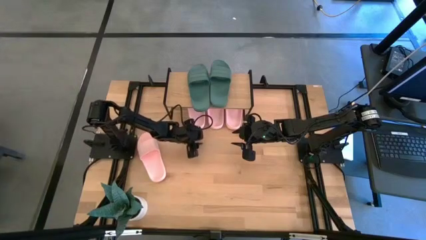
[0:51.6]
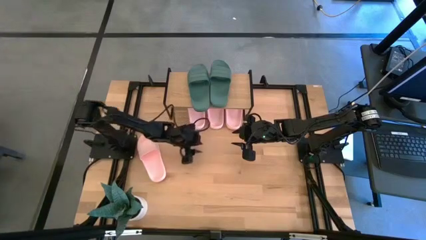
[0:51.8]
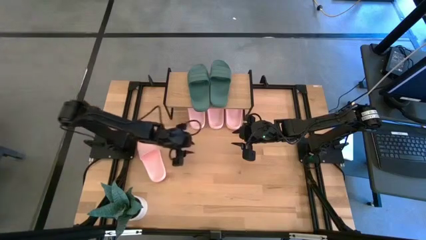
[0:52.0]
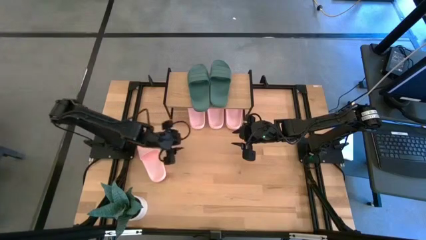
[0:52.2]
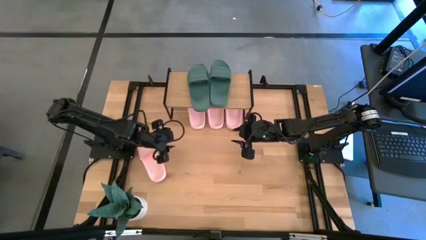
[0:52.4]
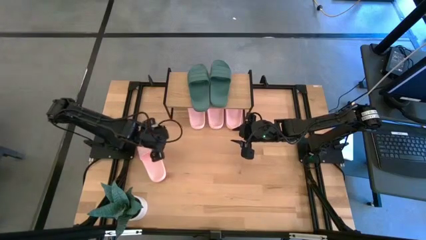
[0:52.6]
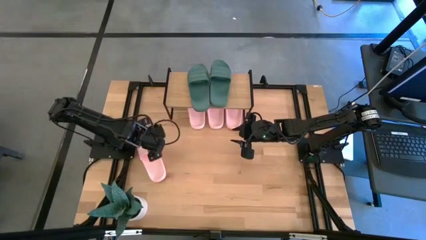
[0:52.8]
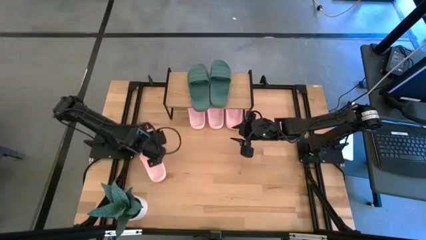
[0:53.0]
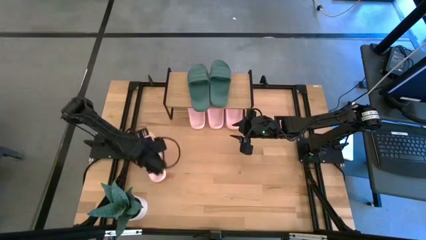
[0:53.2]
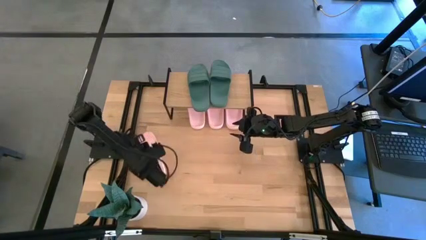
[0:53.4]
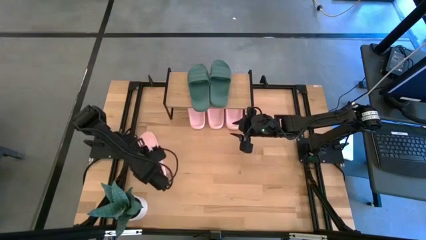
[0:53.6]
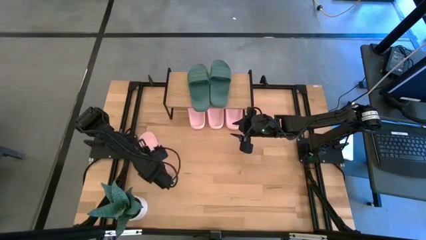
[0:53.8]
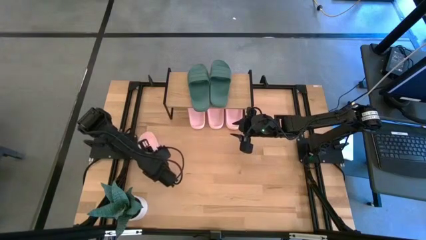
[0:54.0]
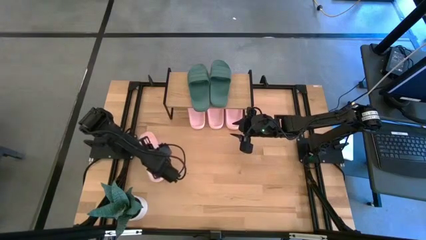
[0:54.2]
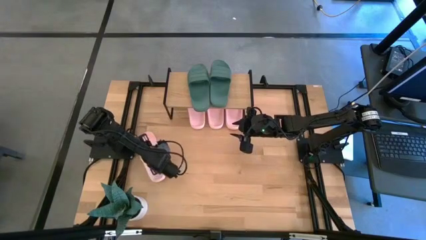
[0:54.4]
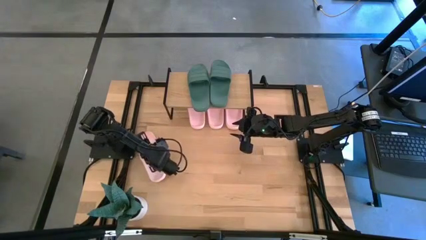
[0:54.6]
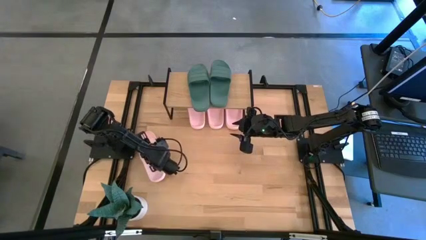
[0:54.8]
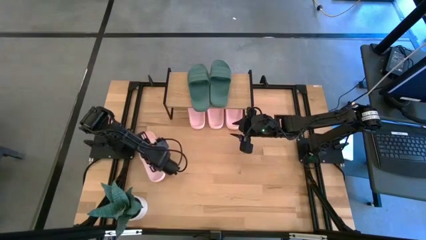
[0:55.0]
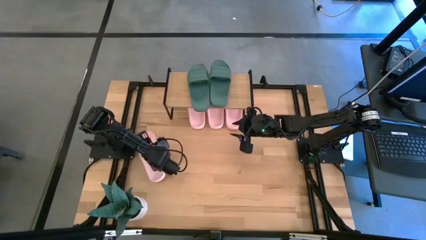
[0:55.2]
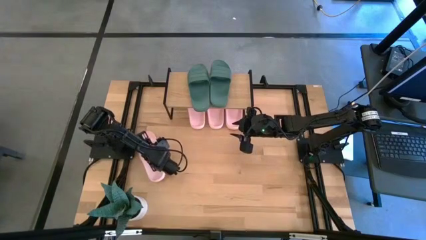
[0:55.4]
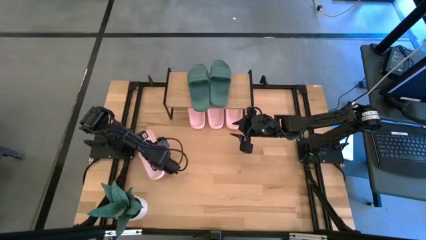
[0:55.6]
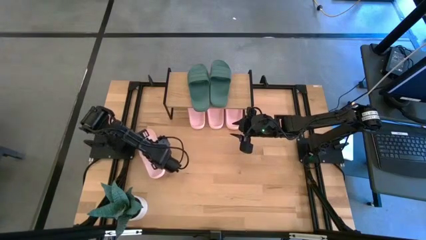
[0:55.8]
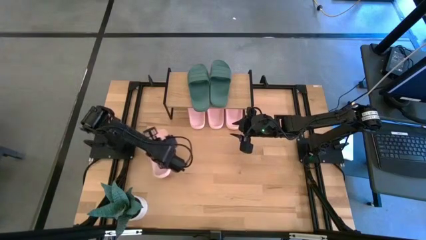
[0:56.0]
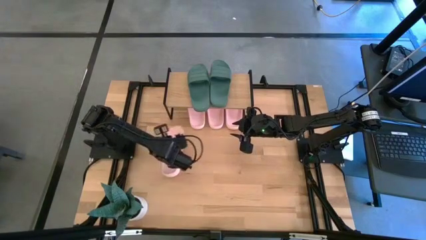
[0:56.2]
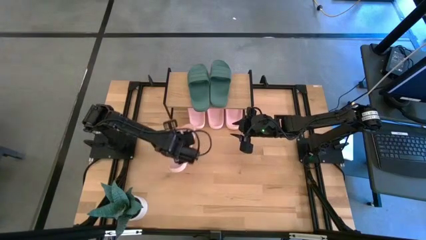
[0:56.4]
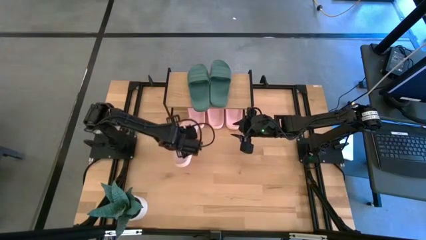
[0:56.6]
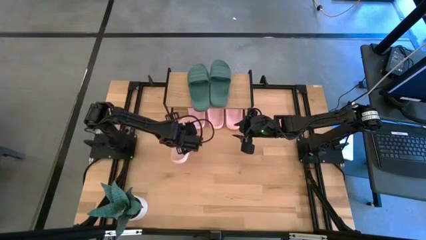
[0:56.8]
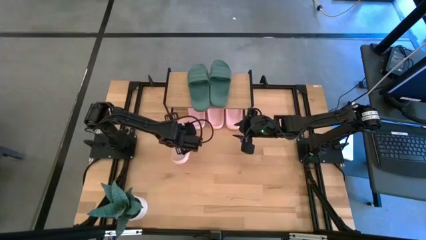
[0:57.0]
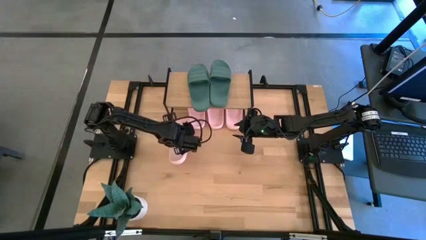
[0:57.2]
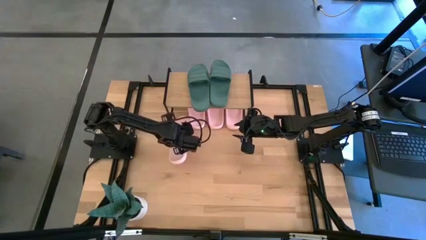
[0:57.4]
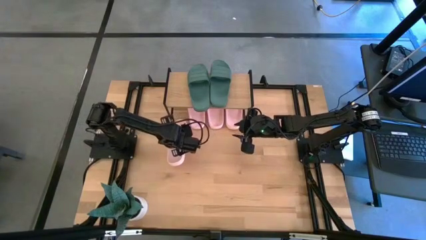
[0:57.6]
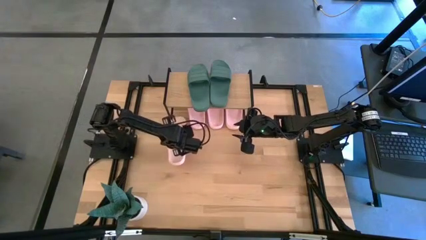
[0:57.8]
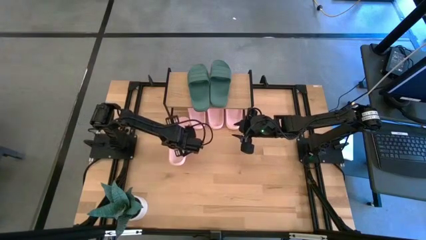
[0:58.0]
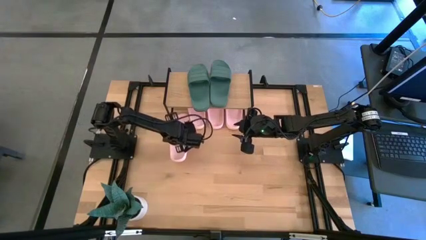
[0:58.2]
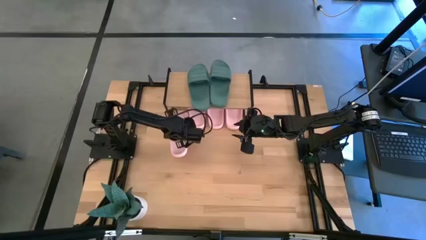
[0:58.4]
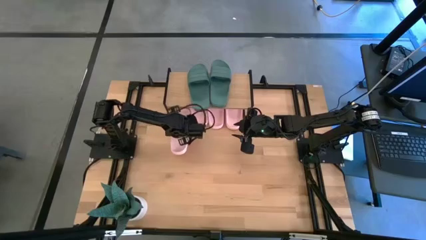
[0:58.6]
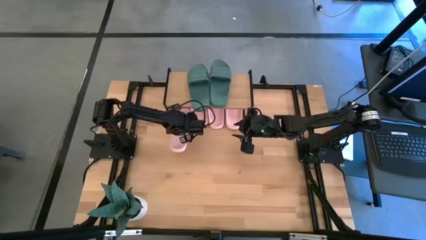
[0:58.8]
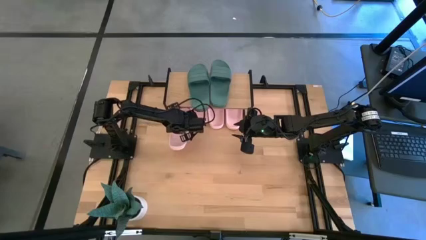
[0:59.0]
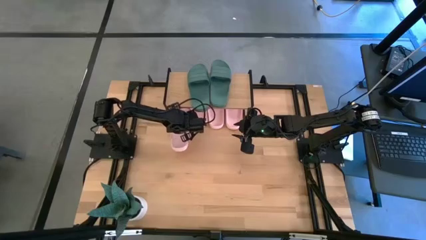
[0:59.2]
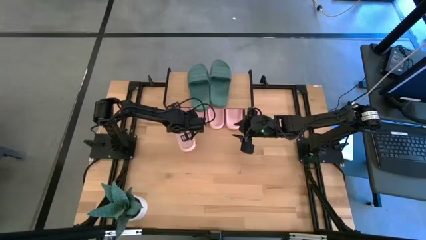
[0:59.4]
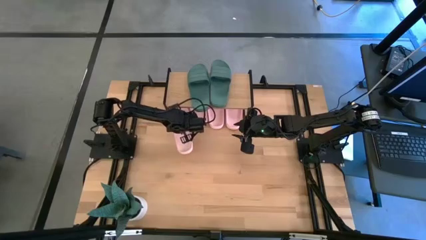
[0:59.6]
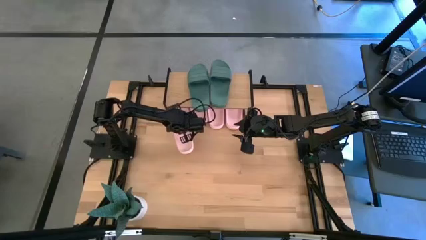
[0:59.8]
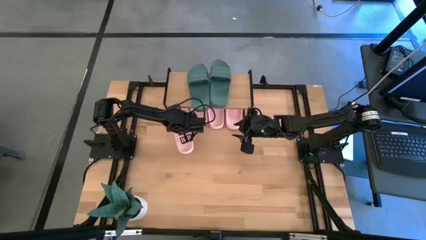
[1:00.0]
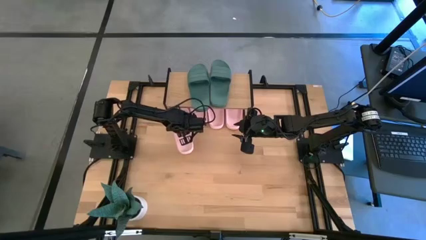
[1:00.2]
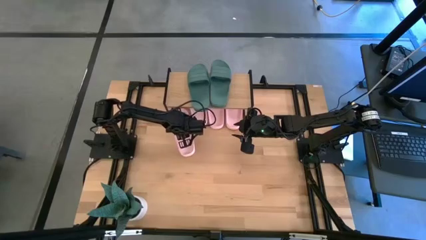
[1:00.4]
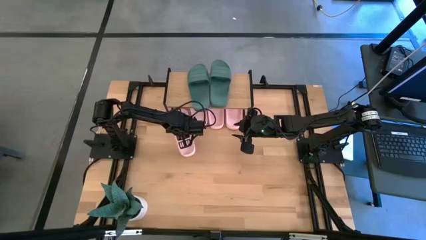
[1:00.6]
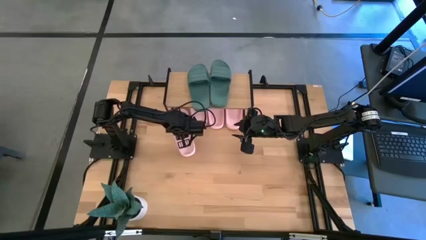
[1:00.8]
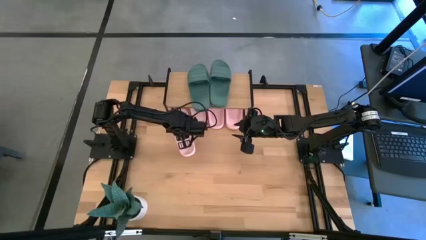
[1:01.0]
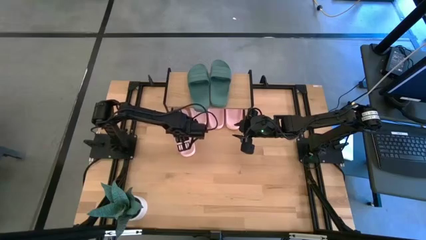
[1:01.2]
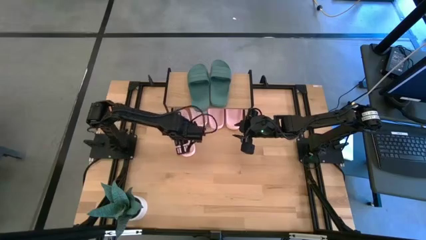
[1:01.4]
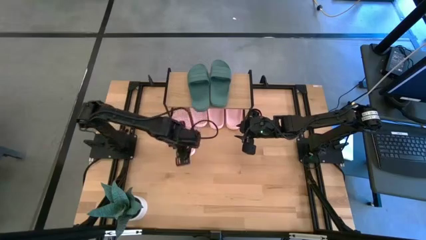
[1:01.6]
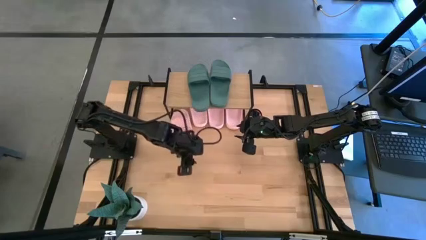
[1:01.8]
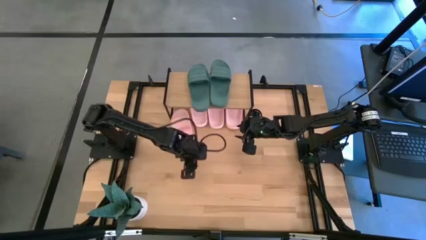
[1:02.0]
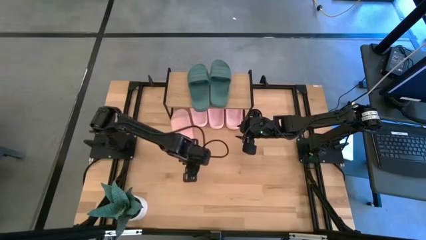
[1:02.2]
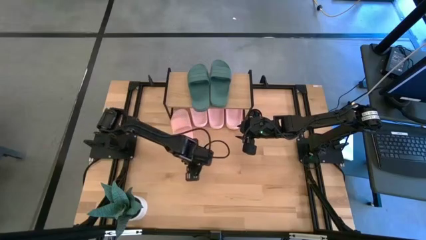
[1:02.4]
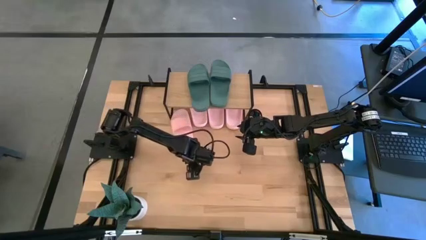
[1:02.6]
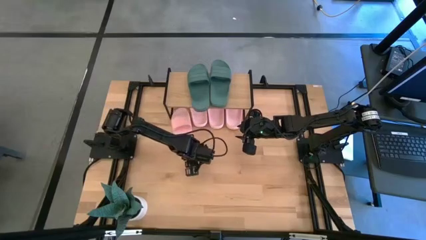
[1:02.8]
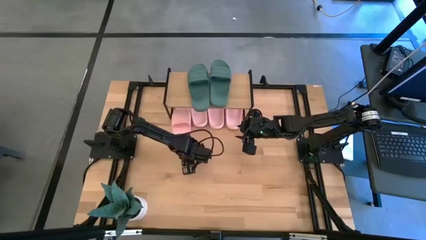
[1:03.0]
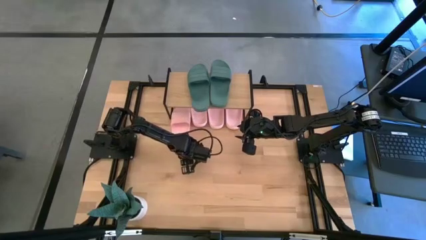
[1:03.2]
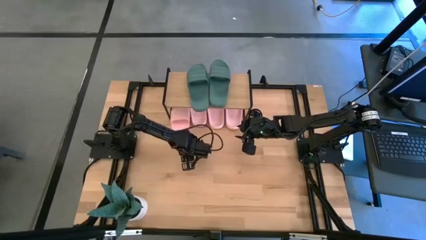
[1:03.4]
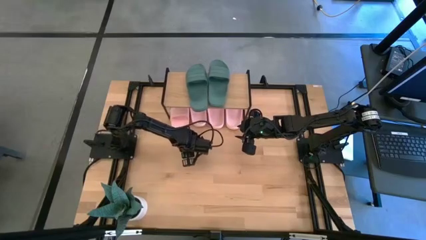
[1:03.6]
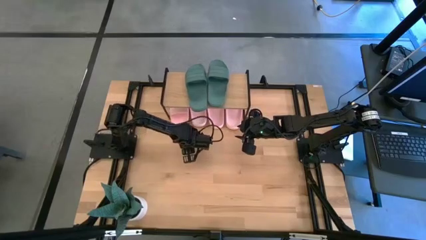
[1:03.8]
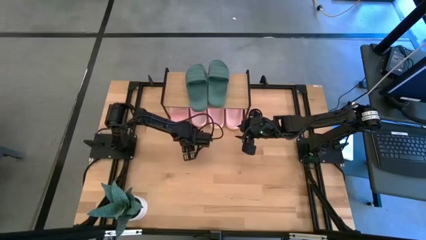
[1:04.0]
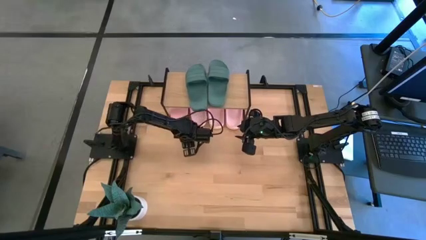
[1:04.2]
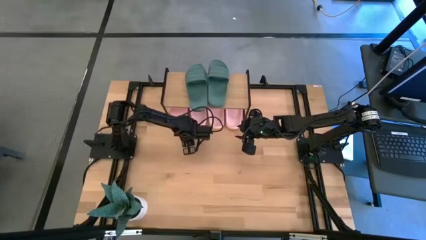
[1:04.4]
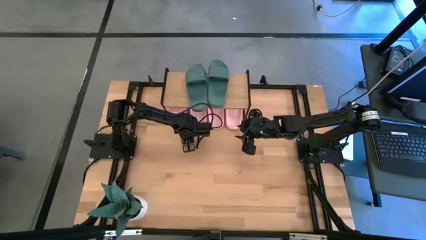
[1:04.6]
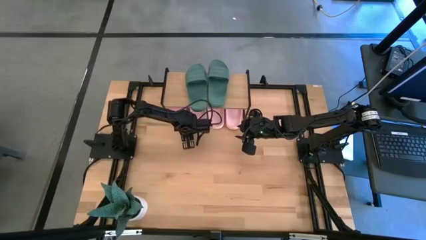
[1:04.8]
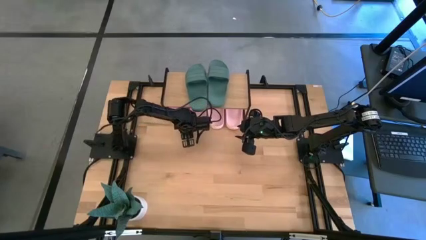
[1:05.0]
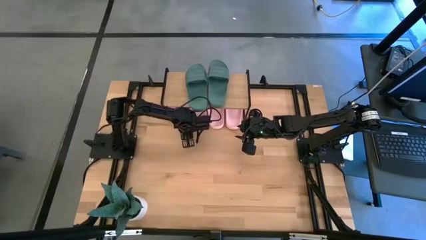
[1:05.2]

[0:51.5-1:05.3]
Task: Pick and place slides into the shelf
Put the pink slipper under the shelf

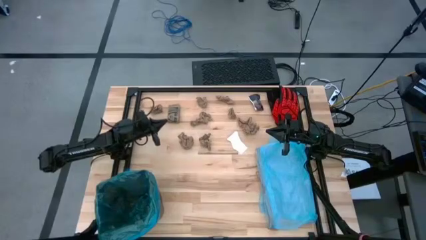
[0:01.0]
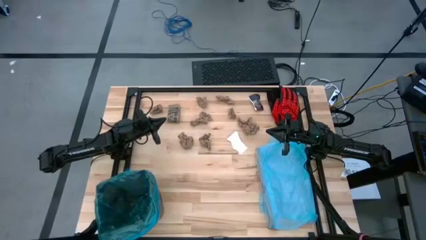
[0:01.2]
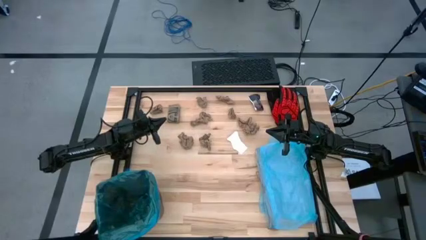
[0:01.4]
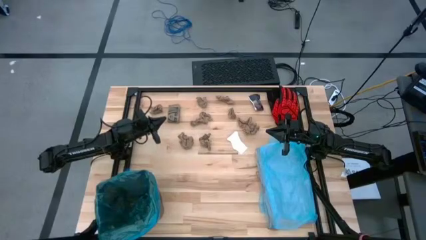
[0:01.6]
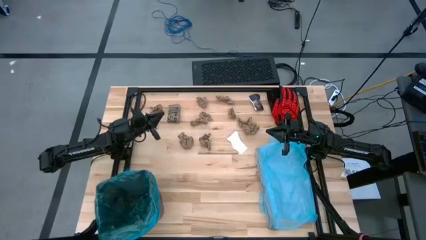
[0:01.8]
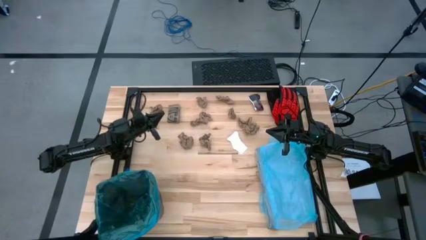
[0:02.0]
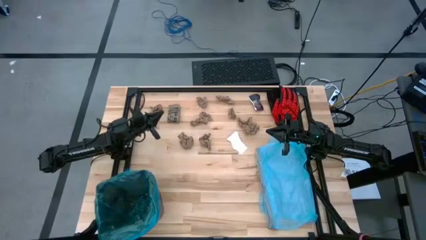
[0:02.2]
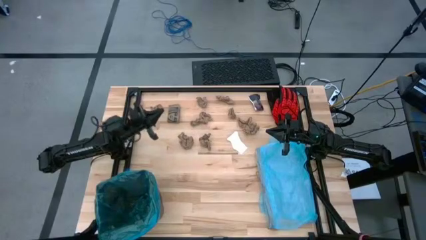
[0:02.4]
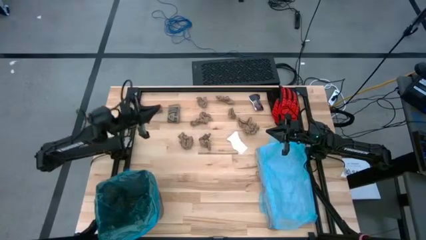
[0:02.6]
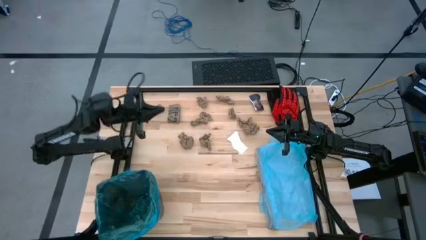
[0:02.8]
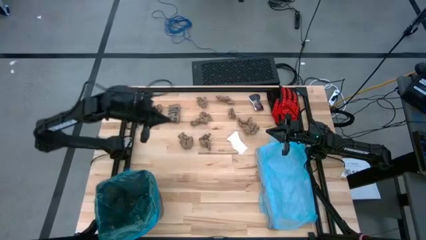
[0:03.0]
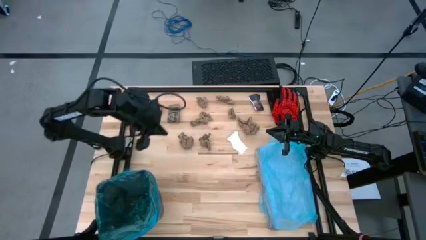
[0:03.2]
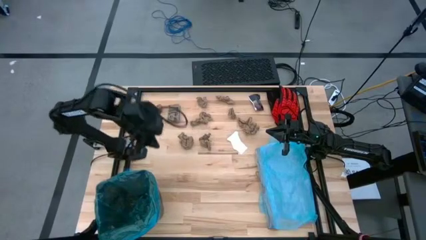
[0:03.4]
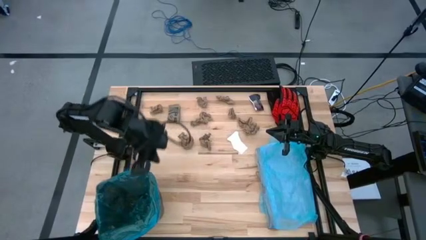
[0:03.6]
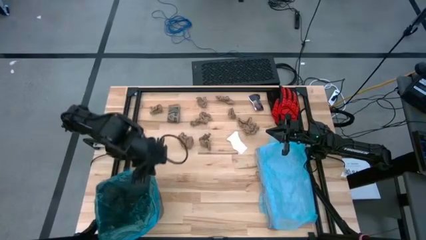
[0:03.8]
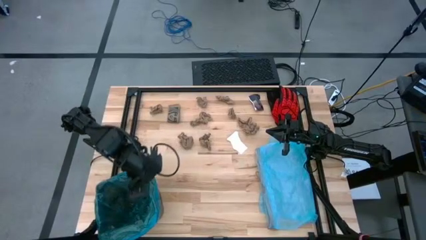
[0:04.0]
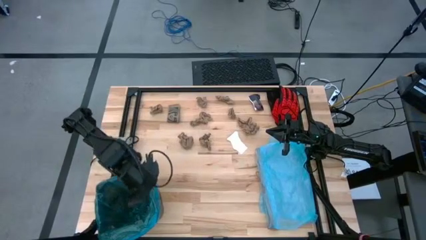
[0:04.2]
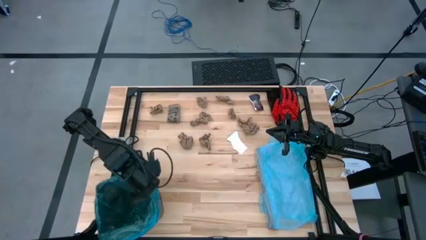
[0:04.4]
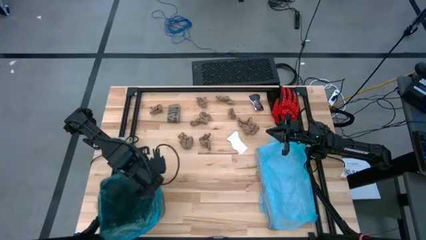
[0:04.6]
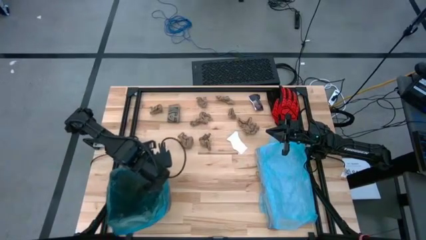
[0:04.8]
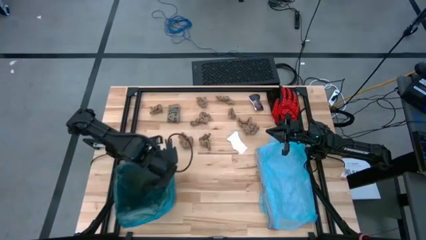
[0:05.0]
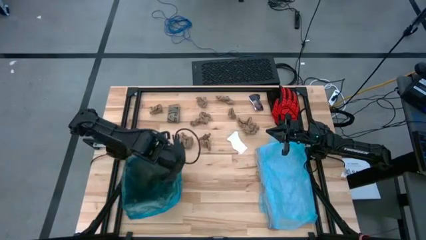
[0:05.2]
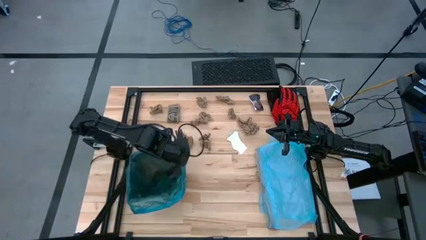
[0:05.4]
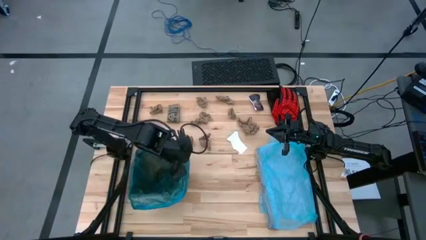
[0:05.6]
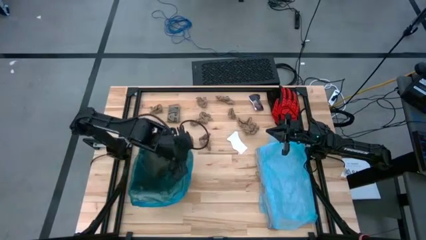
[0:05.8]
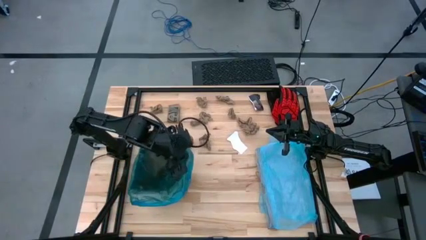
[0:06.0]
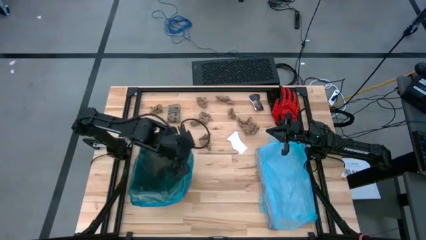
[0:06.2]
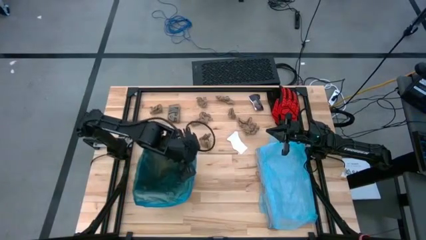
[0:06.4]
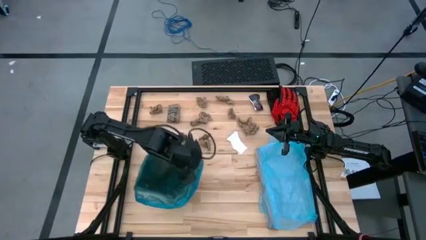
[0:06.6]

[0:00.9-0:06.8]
Task: place trash/remove bag and relplace
Move the trash bin to the middle of the table
